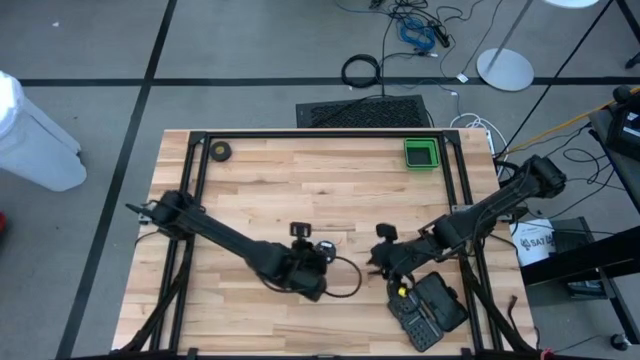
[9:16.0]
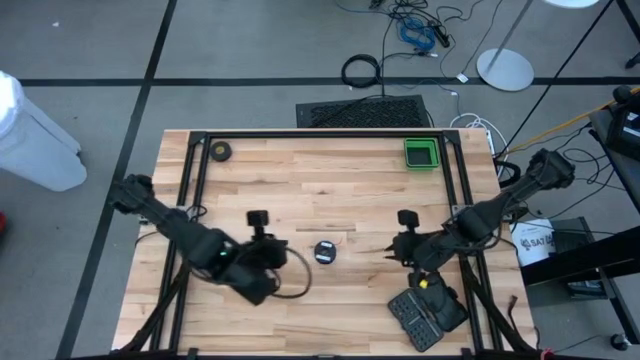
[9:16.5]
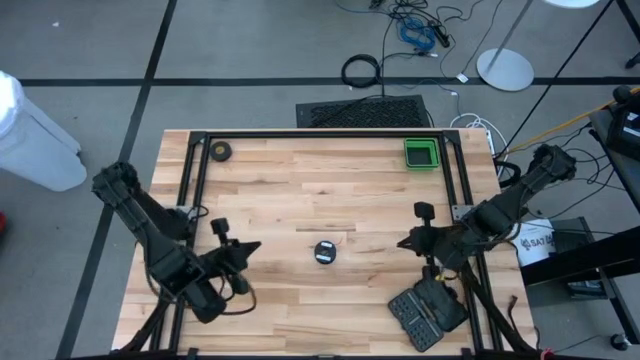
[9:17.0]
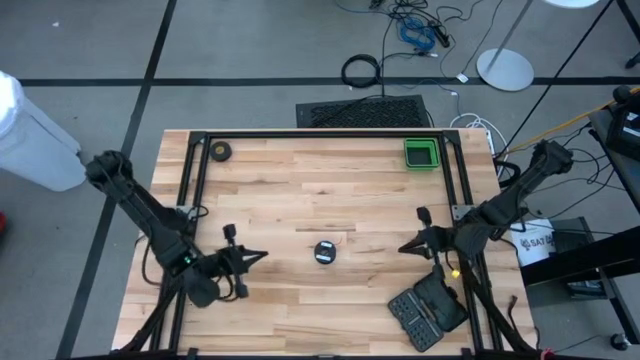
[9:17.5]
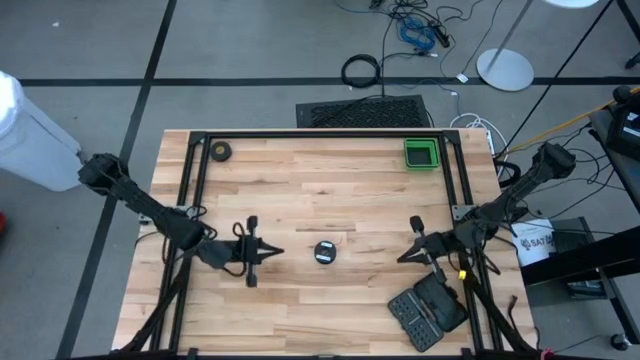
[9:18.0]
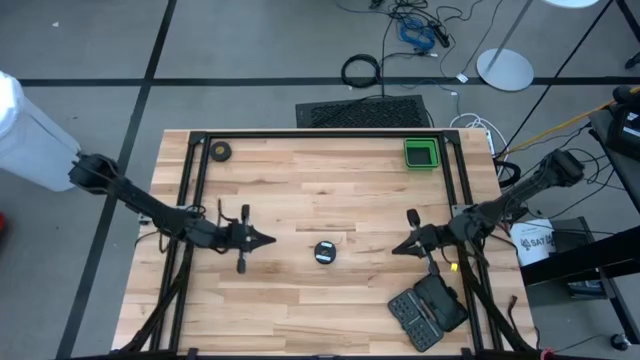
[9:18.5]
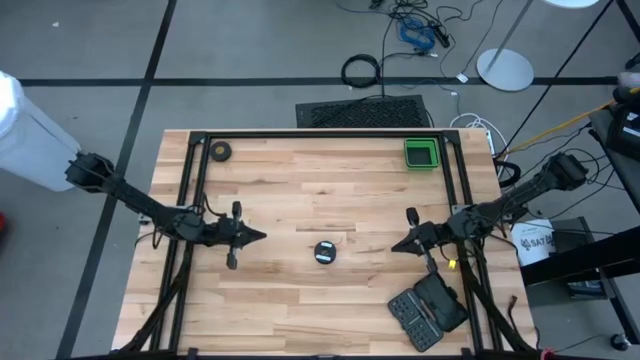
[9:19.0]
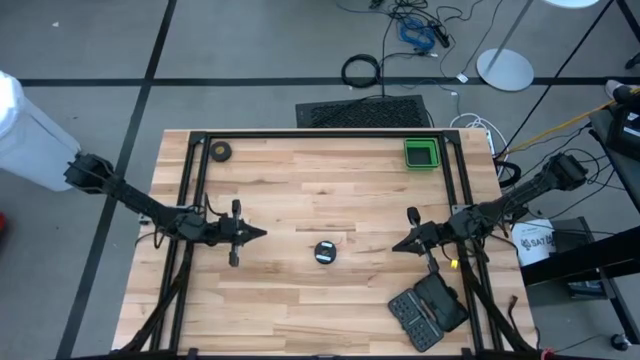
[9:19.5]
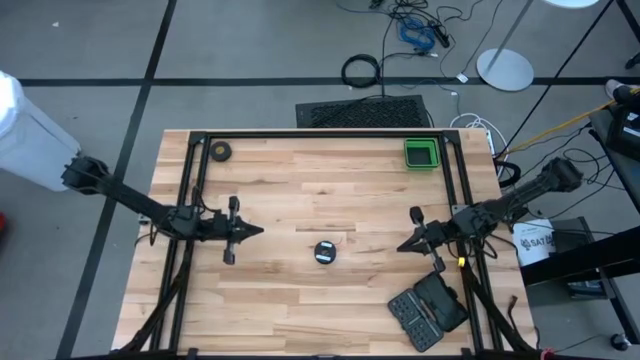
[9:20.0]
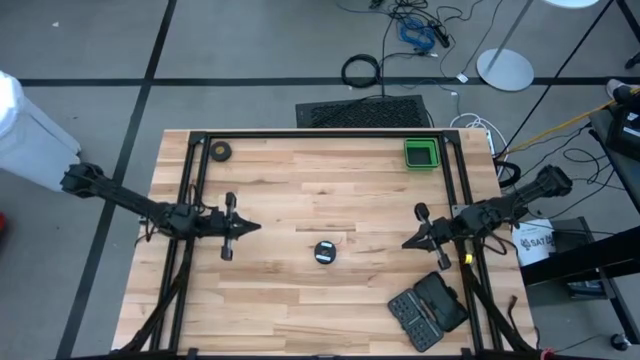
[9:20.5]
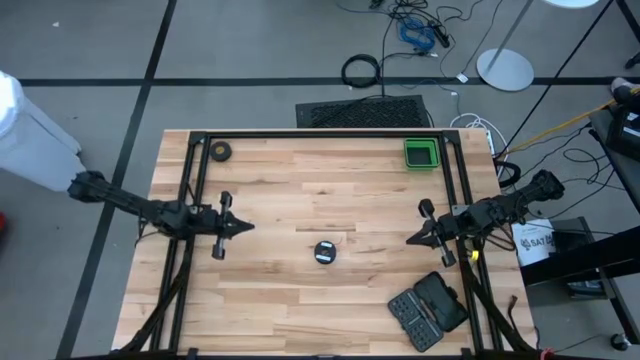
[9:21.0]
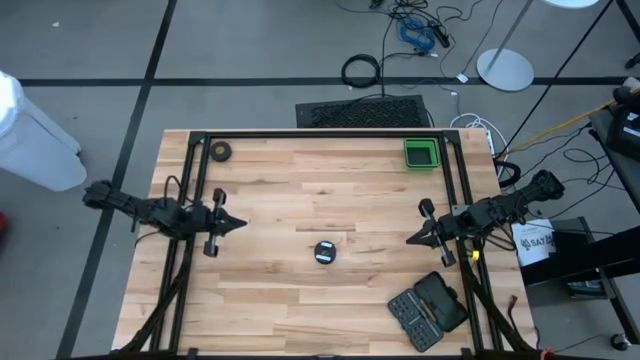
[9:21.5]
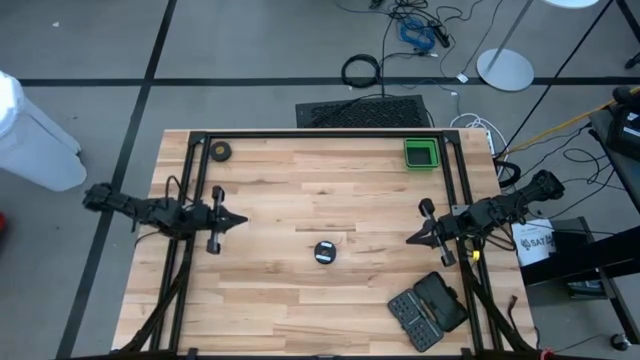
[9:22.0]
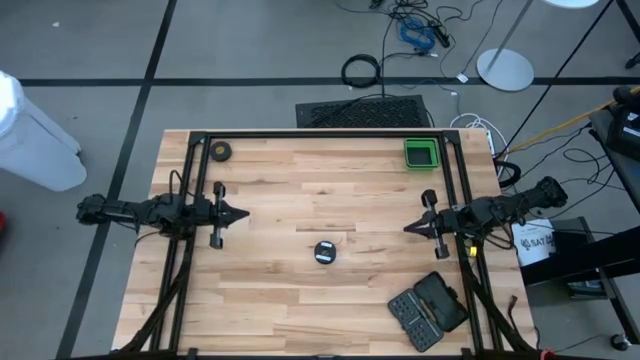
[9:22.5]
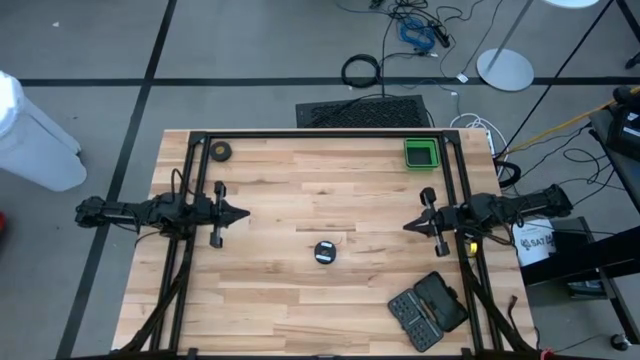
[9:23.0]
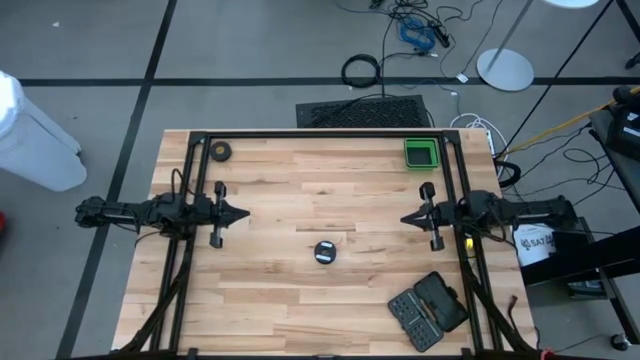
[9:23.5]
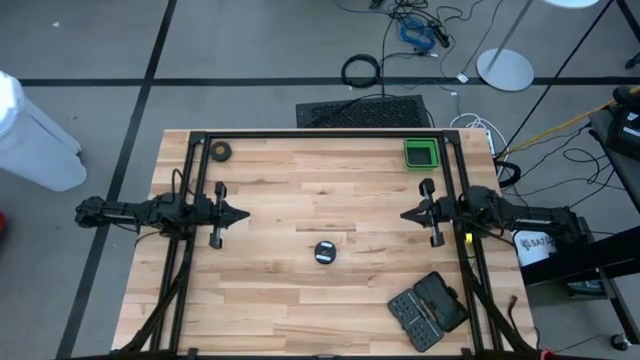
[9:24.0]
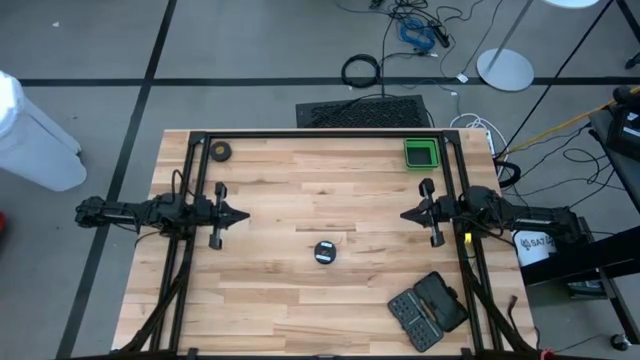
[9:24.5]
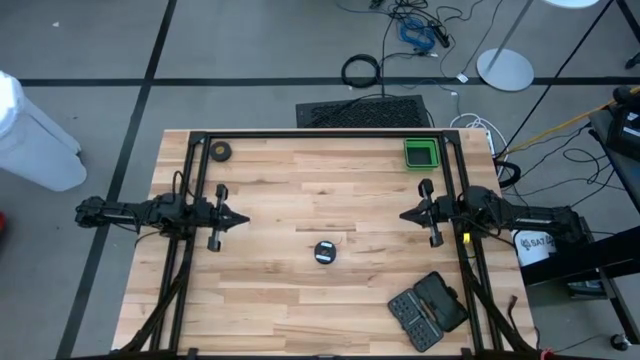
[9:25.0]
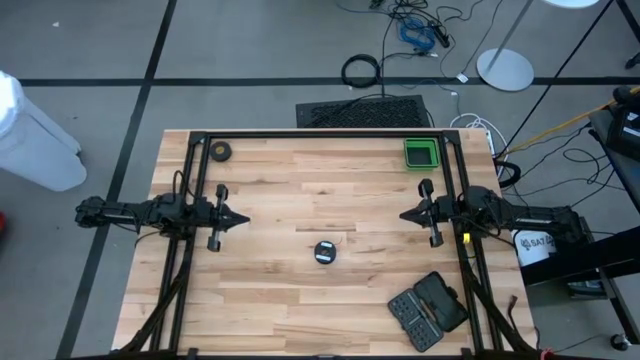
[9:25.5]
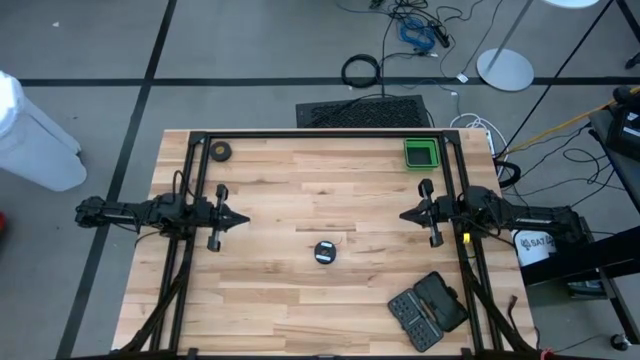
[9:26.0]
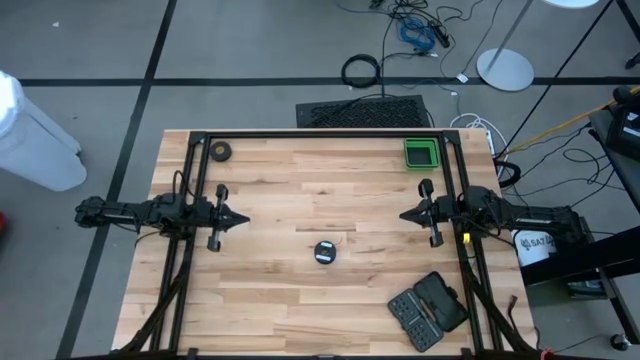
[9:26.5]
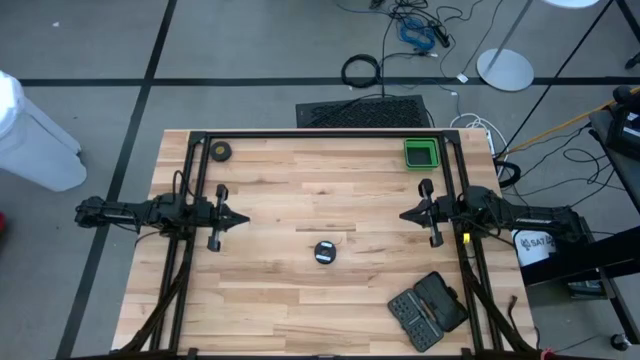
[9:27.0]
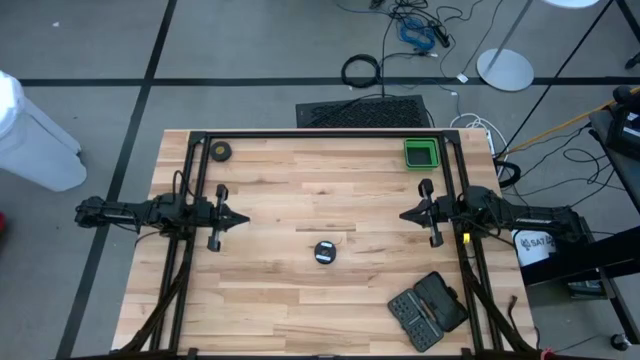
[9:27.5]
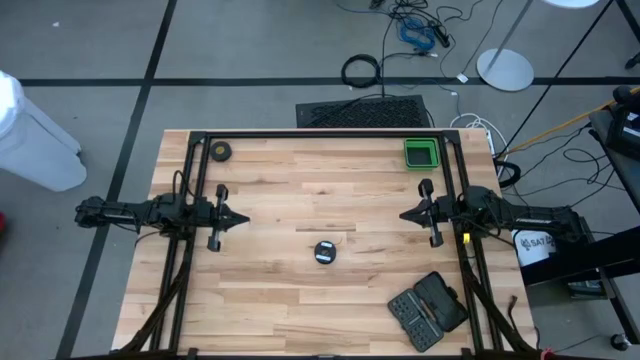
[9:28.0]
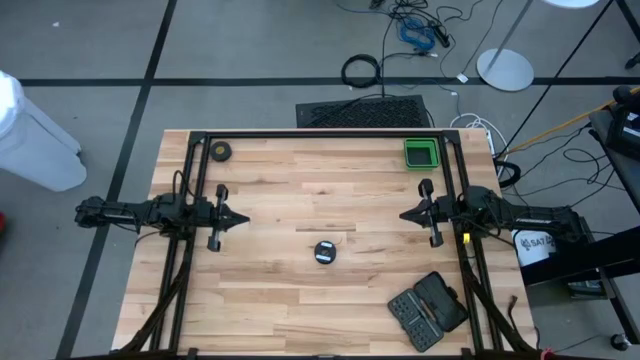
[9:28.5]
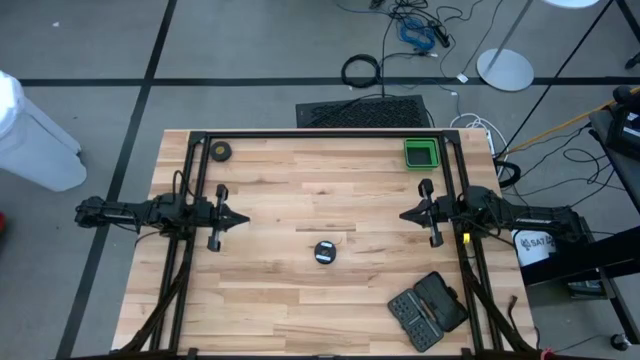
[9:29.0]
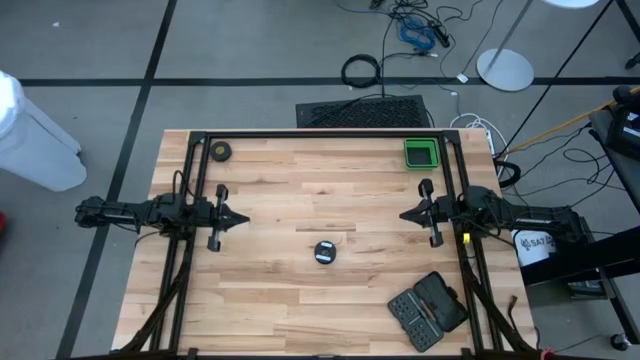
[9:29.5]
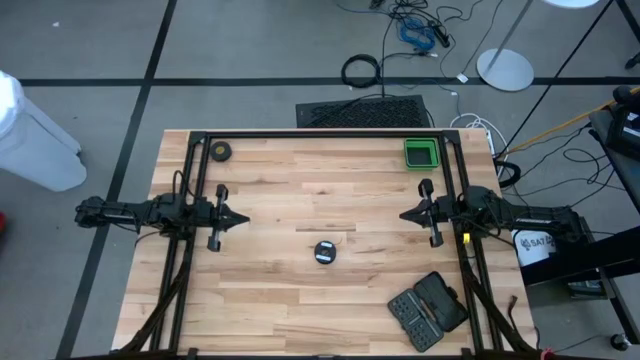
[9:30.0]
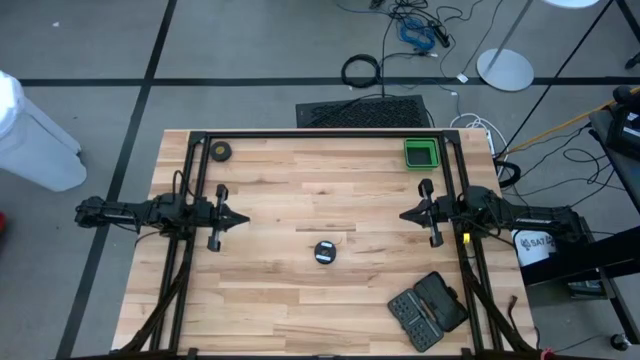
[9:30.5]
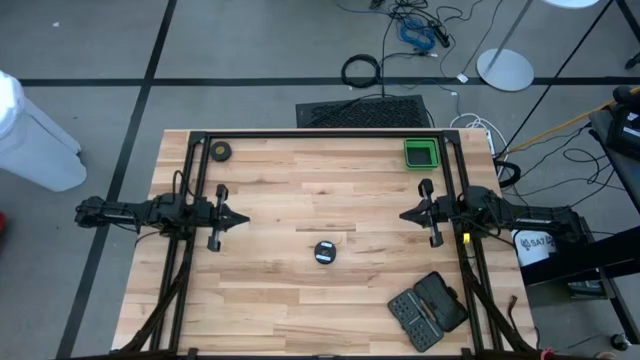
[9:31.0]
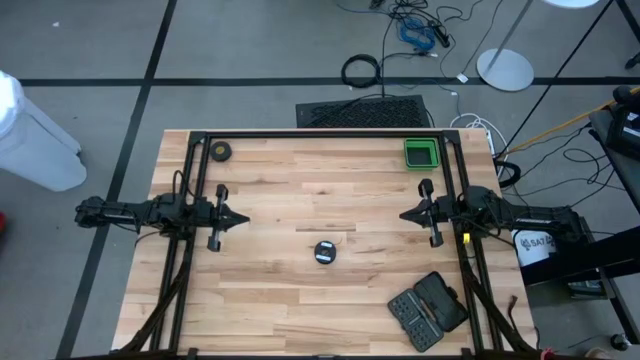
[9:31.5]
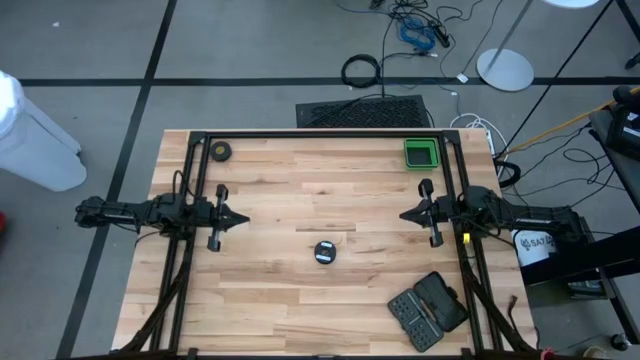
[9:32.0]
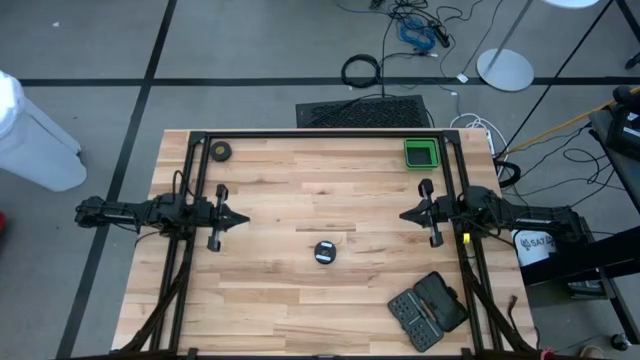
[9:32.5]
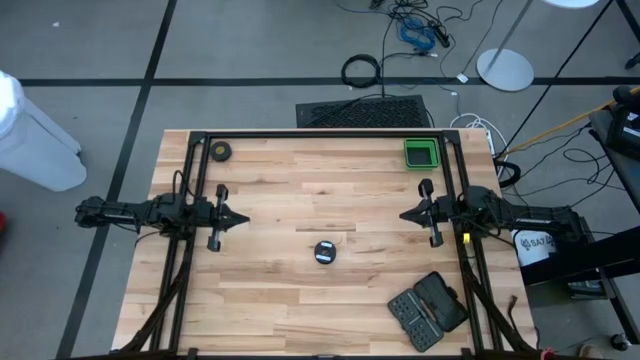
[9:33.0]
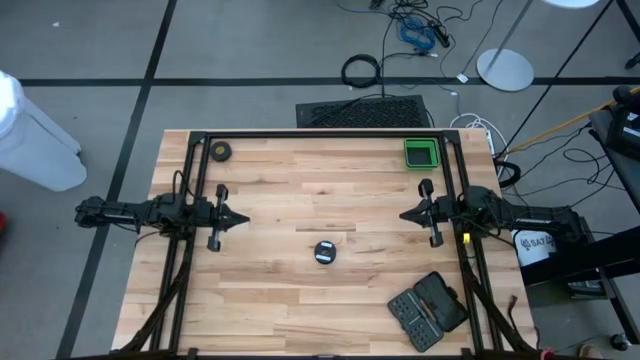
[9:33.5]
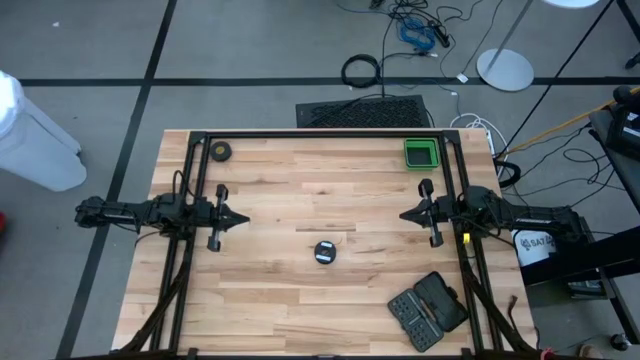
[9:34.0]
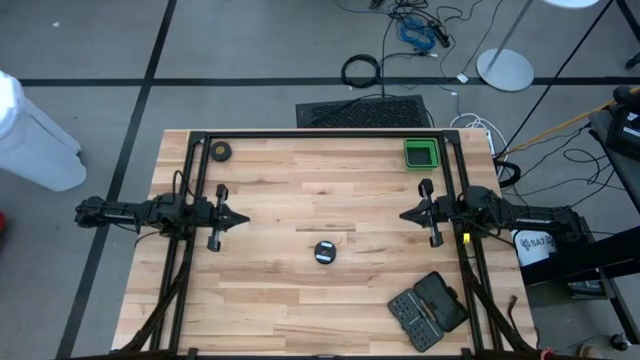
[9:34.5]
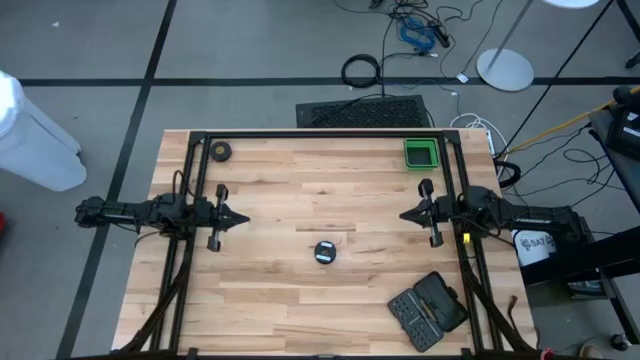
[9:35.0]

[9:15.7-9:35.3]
Task: Coil cords
Return to Home Position
